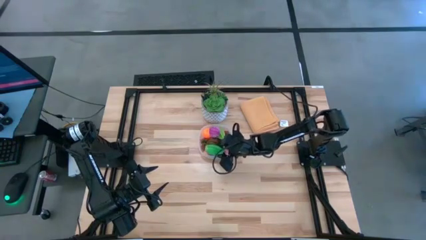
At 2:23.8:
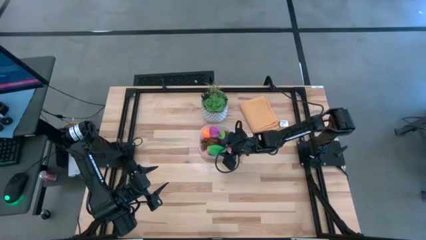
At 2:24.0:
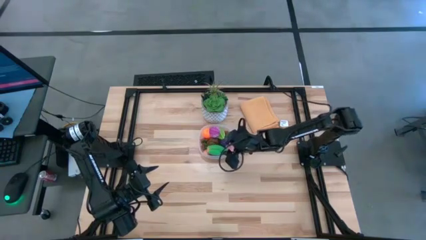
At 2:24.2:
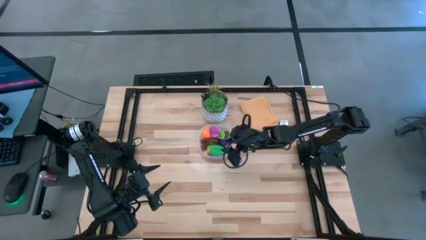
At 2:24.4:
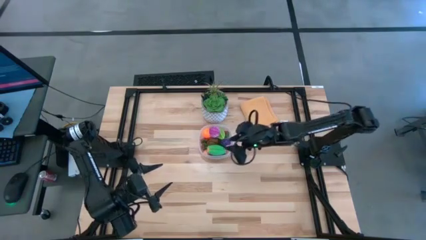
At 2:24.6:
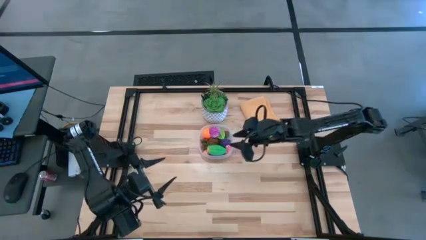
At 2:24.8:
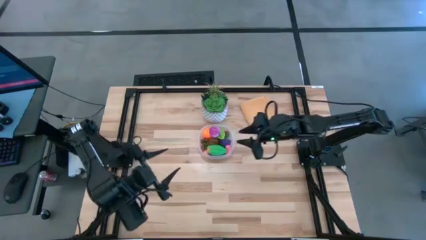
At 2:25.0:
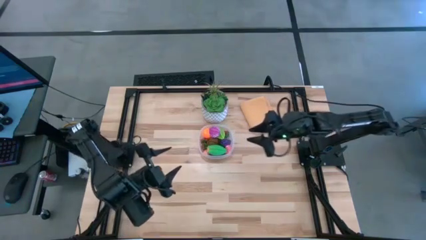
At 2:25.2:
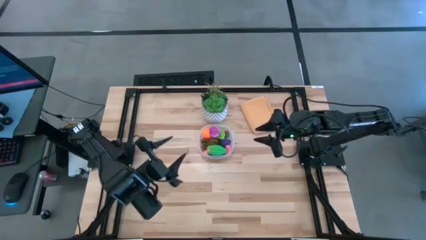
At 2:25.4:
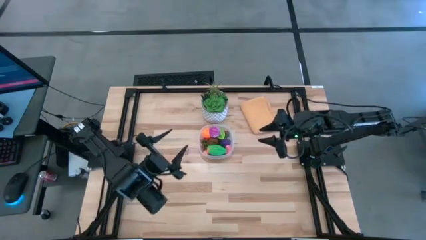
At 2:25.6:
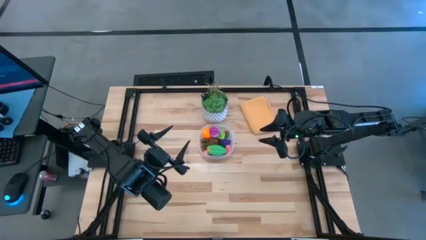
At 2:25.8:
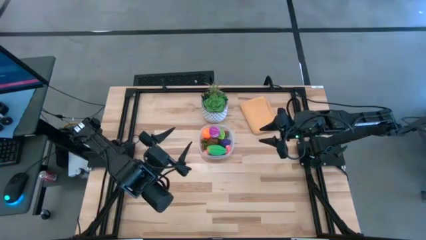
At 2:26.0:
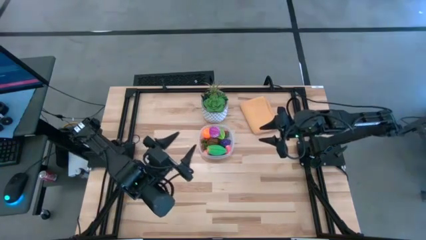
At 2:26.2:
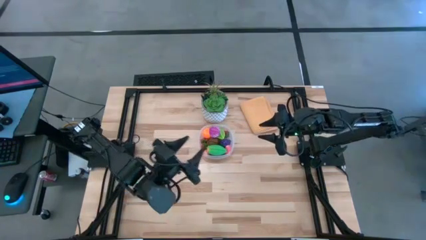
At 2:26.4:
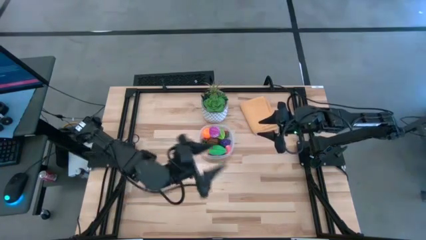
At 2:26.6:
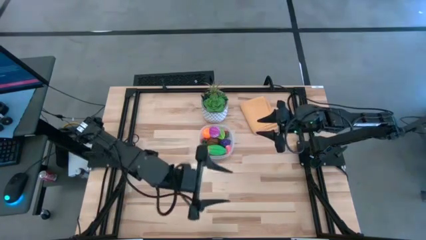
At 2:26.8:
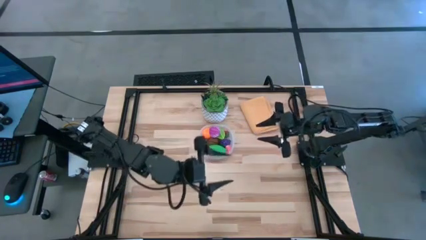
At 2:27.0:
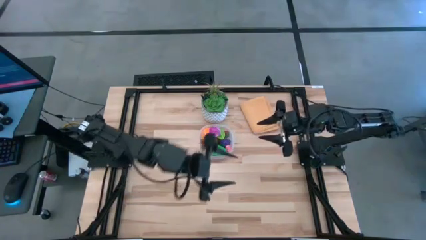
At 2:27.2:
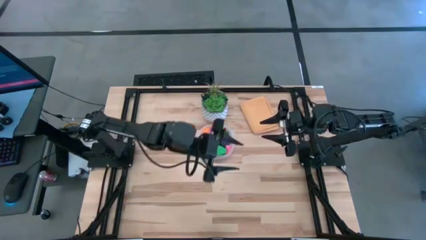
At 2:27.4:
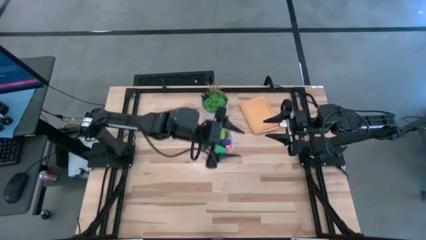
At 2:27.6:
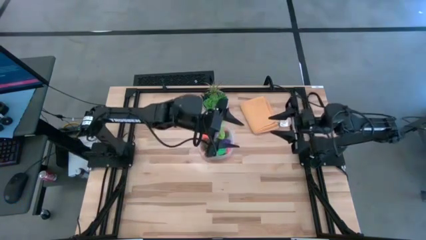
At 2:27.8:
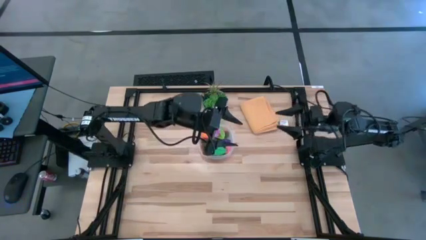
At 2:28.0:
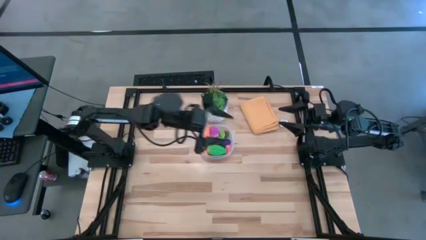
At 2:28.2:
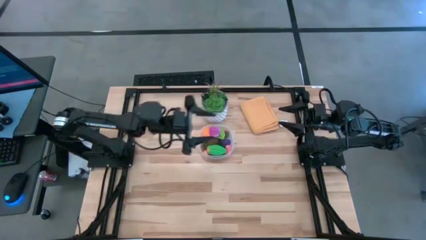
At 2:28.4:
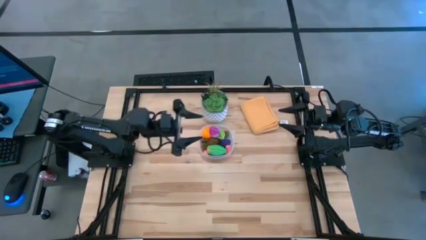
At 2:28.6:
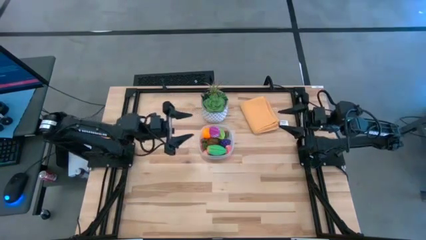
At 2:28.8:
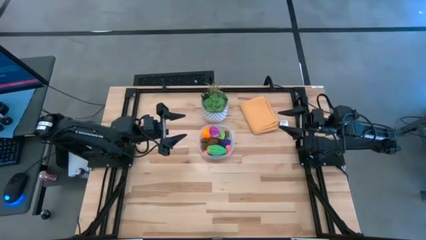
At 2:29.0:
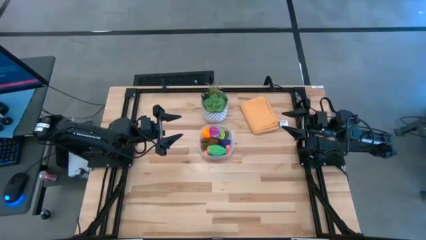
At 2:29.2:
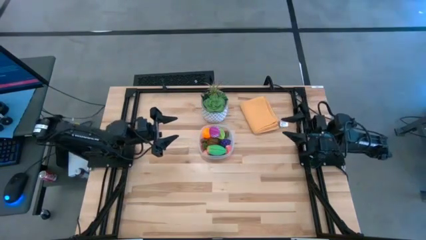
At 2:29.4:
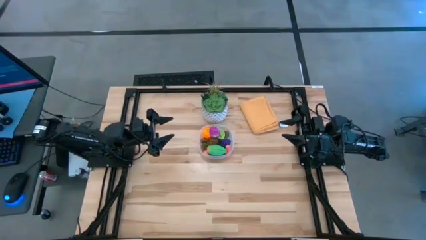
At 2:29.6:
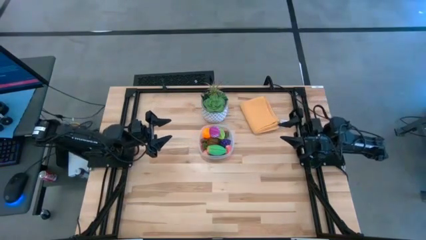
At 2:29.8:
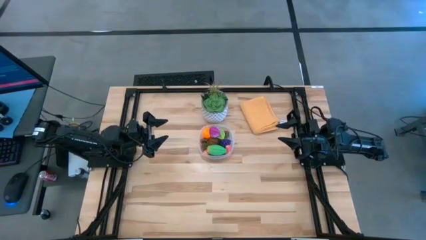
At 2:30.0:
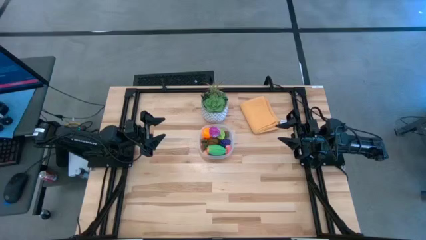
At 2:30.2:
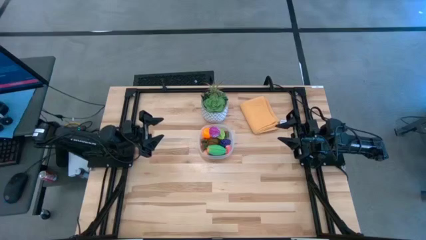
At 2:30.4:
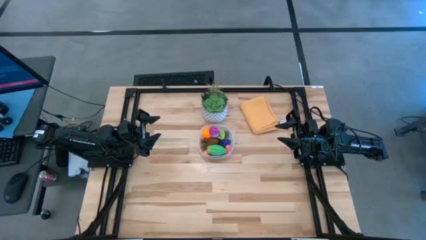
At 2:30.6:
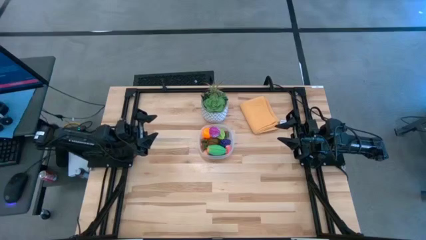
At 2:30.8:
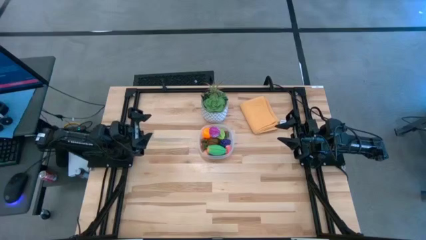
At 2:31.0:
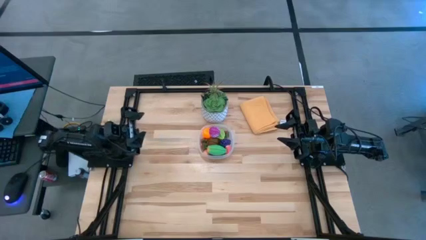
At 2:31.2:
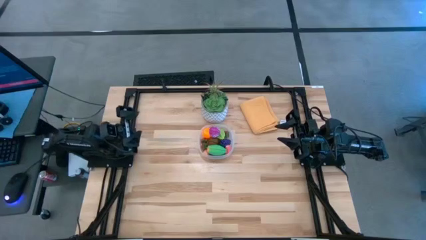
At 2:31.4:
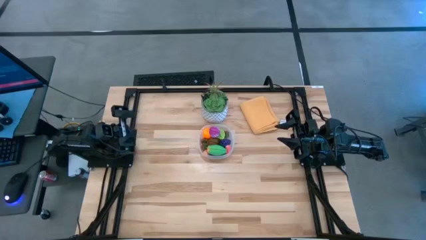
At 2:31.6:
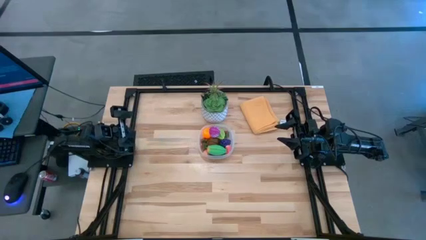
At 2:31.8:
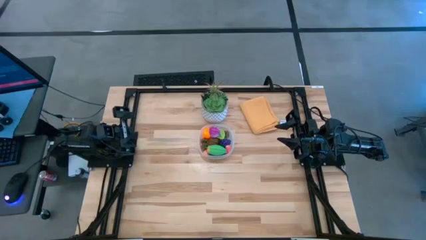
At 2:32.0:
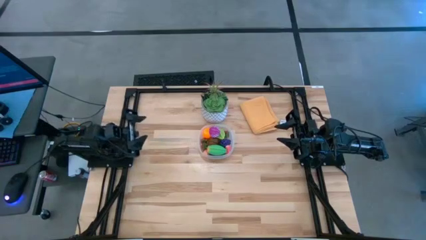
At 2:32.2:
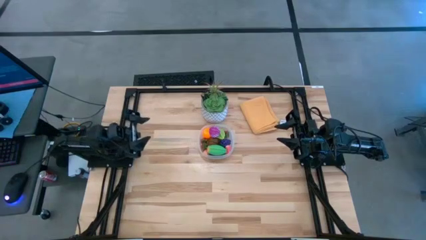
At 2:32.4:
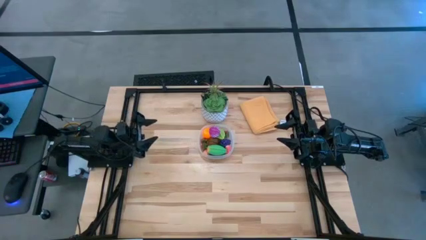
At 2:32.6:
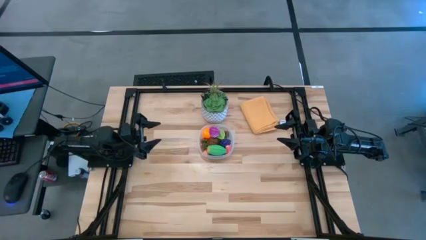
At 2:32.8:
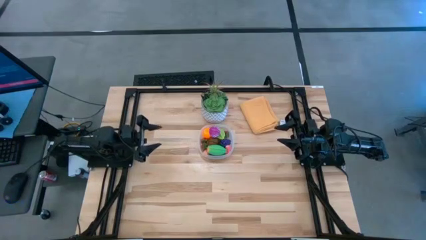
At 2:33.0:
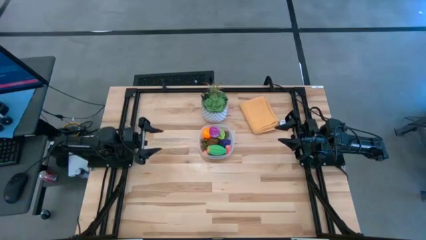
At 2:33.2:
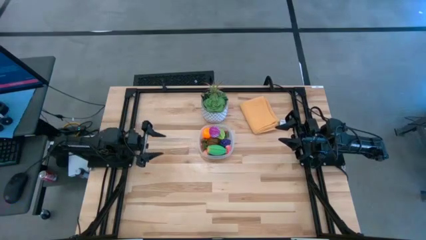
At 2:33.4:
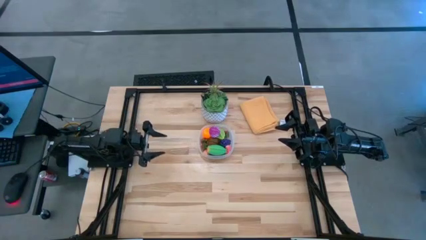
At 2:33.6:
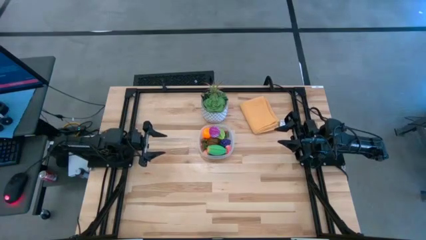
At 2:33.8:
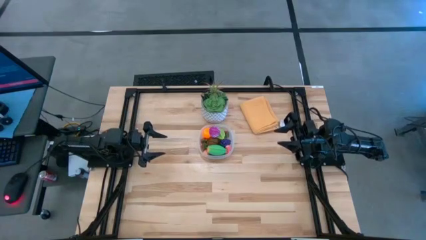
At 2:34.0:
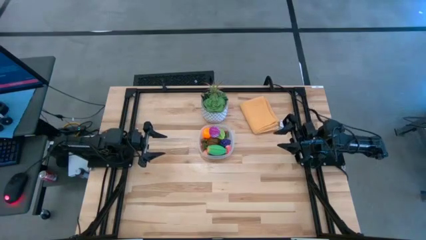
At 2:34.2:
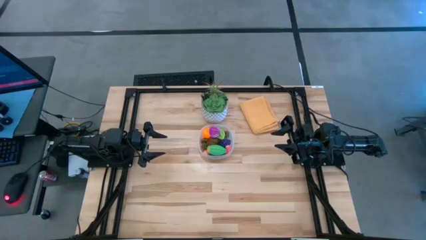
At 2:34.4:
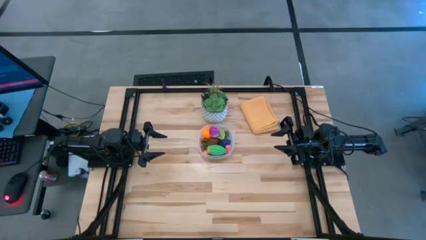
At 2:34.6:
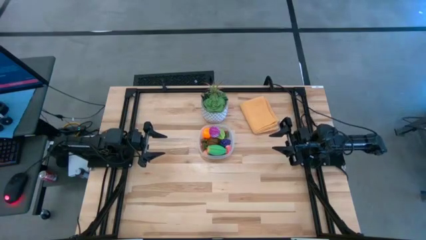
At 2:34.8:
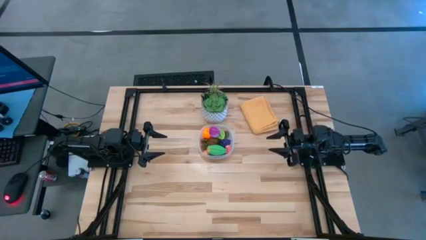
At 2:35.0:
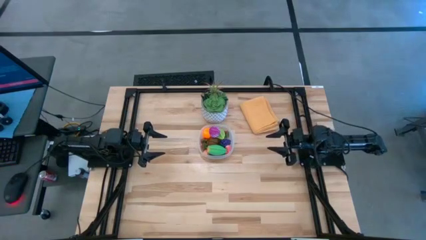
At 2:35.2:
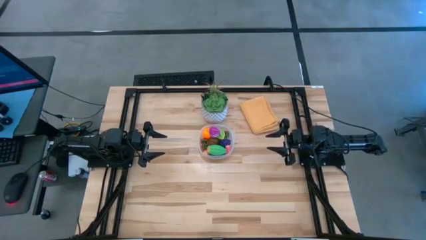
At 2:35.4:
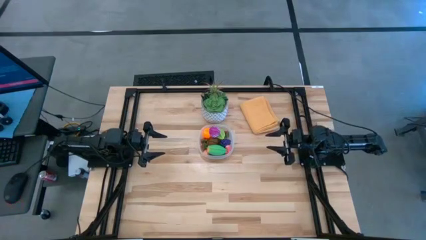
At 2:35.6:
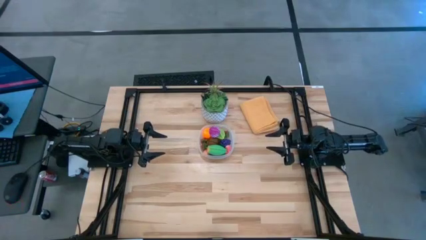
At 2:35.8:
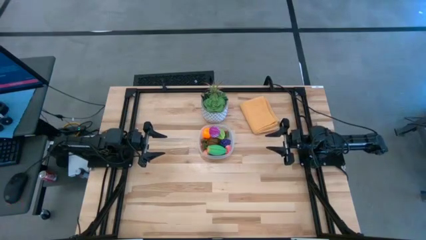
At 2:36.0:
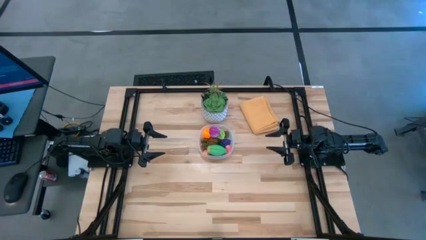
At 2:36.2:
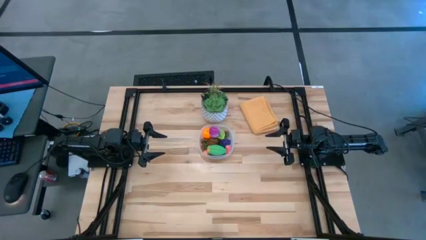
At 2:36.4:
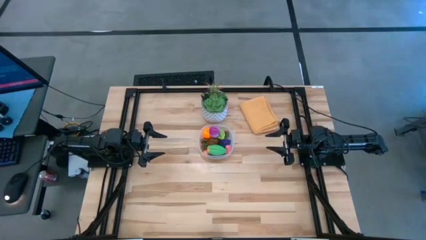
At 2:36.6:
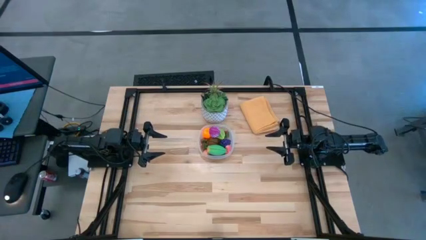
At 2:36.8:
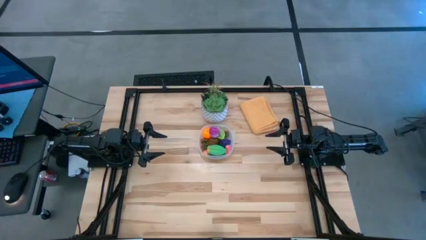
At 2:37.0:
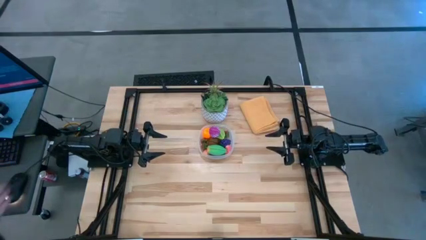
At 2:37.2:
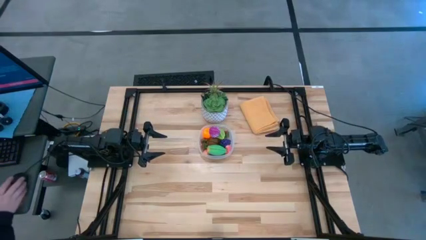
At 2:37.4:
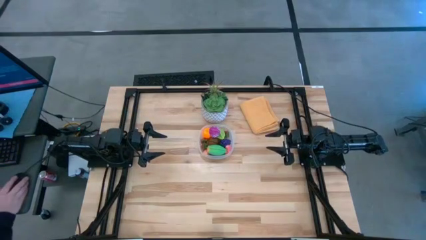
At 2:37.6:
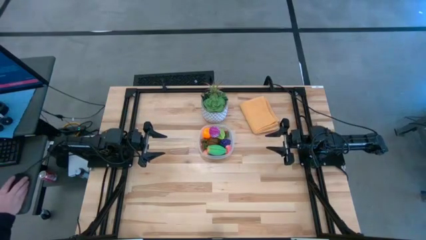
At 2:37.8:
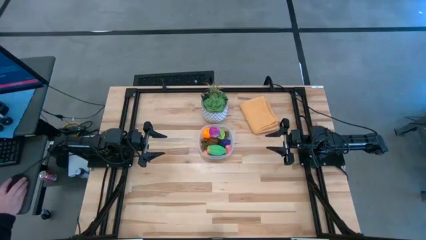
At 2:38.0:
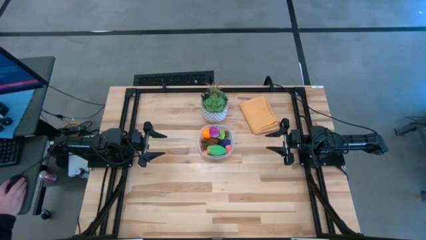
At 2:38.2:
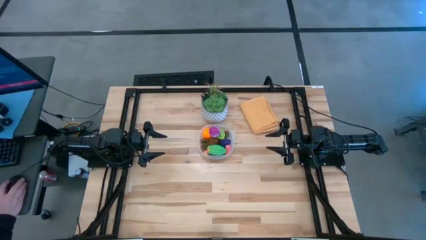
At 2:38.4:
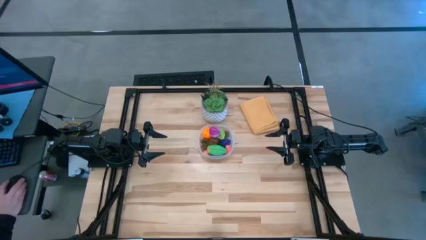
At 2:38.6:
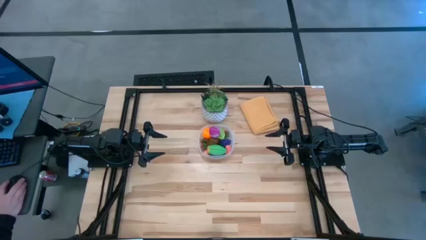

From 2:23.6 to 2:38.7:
Task: Pick and placing Produce into tupperware
Return to Home Position
